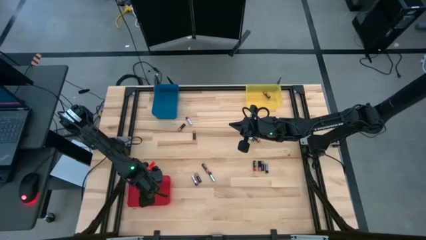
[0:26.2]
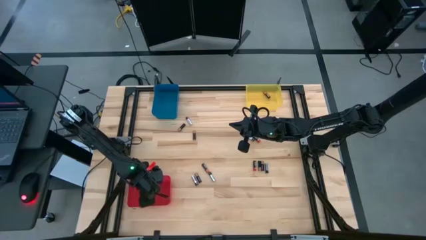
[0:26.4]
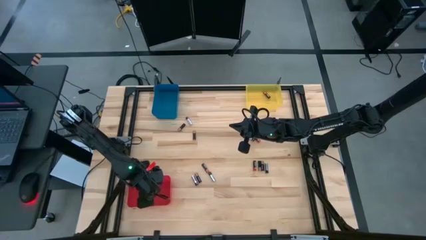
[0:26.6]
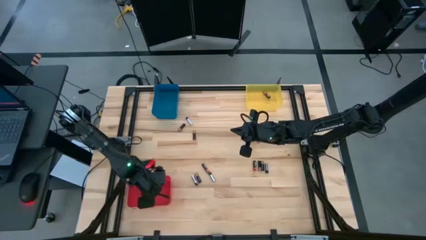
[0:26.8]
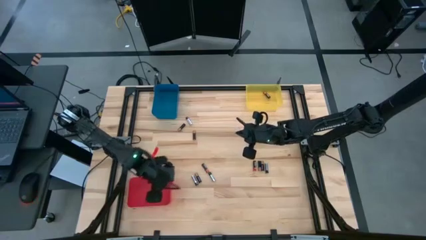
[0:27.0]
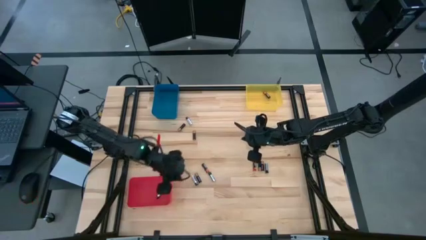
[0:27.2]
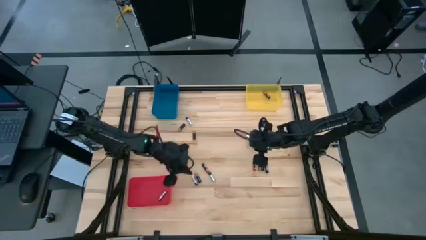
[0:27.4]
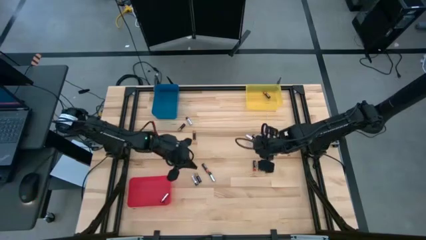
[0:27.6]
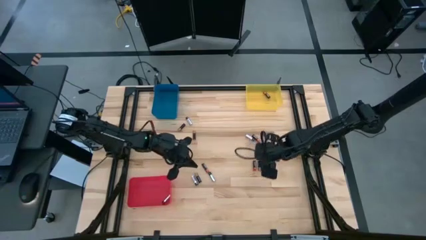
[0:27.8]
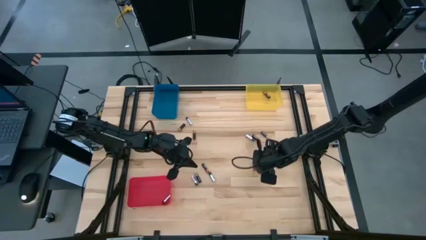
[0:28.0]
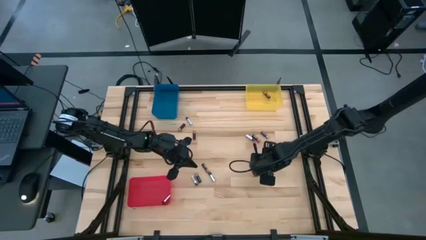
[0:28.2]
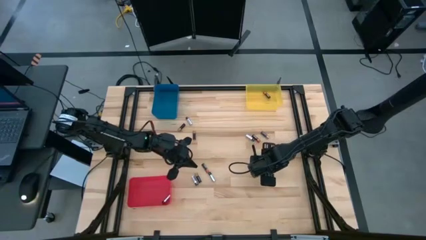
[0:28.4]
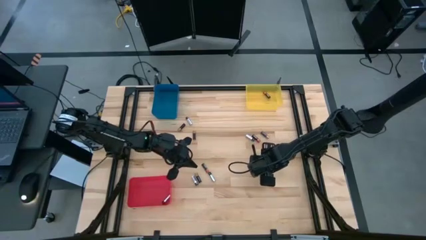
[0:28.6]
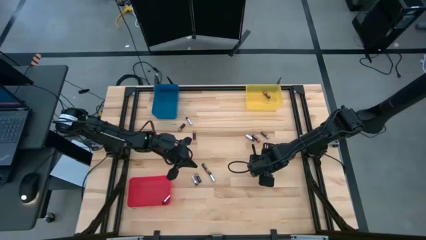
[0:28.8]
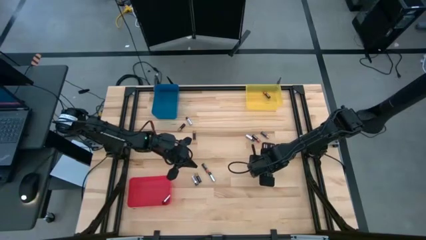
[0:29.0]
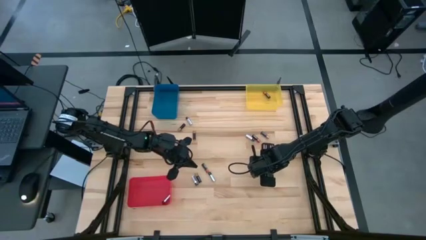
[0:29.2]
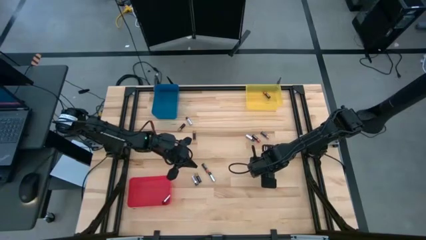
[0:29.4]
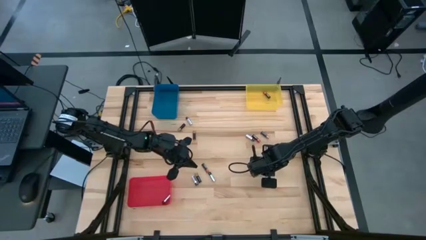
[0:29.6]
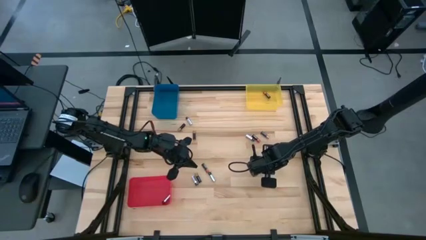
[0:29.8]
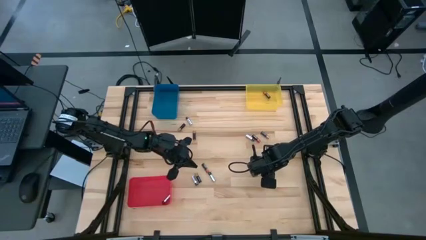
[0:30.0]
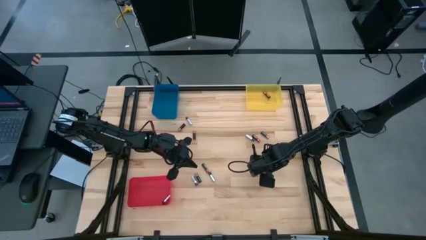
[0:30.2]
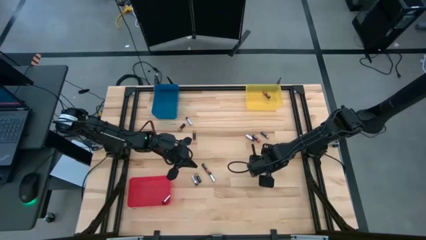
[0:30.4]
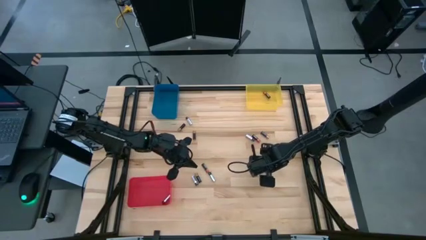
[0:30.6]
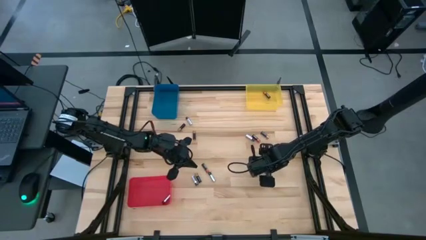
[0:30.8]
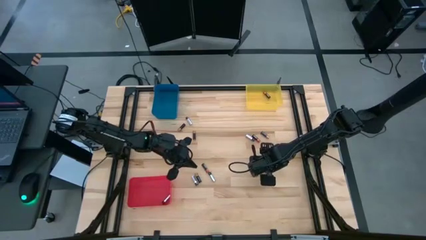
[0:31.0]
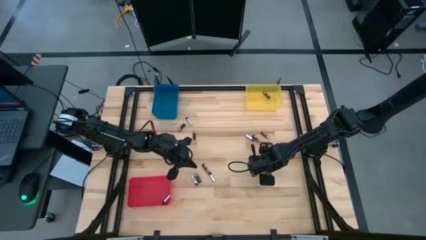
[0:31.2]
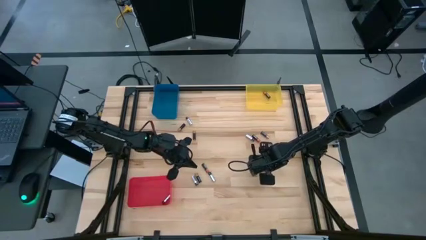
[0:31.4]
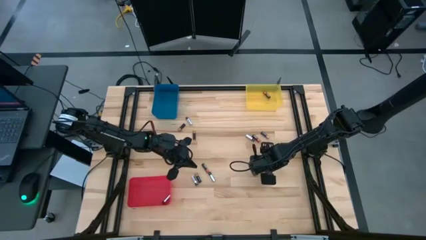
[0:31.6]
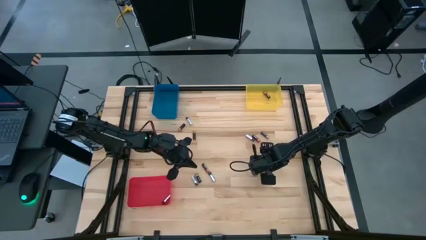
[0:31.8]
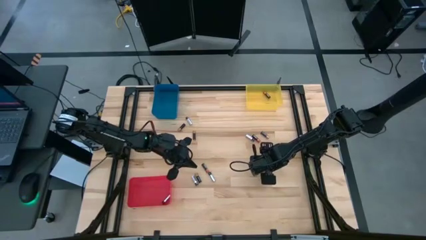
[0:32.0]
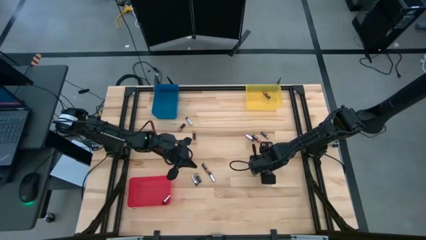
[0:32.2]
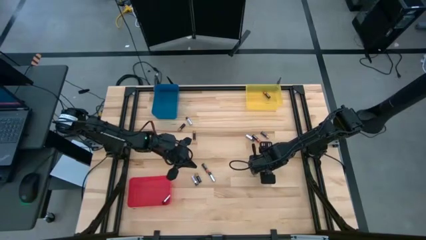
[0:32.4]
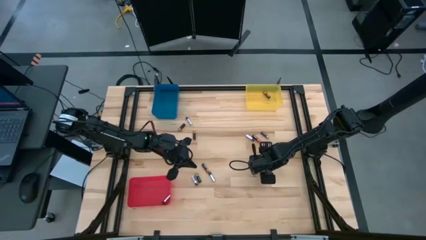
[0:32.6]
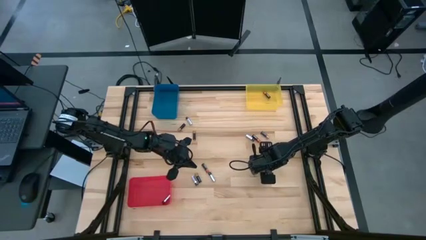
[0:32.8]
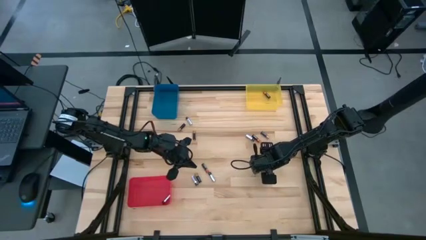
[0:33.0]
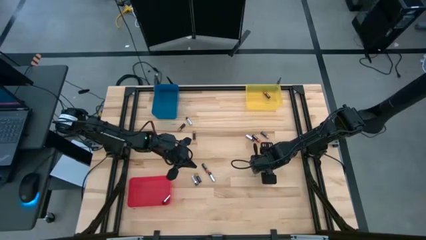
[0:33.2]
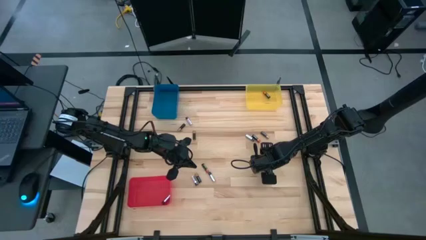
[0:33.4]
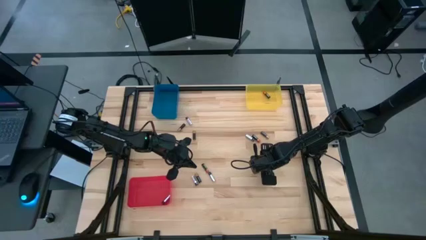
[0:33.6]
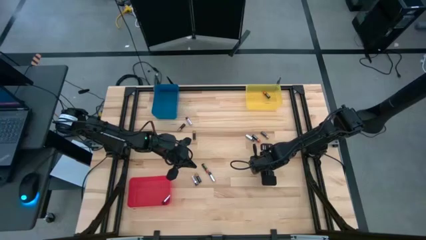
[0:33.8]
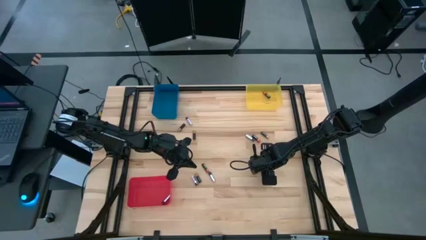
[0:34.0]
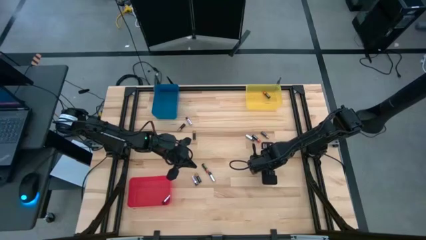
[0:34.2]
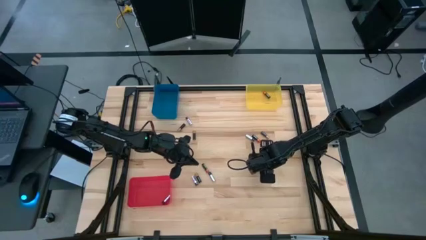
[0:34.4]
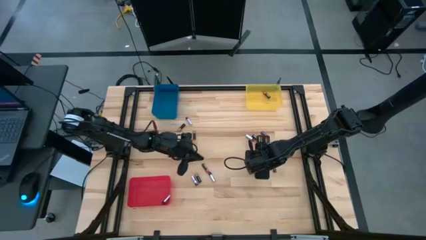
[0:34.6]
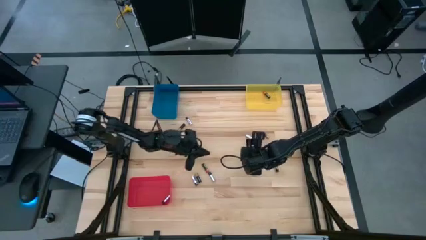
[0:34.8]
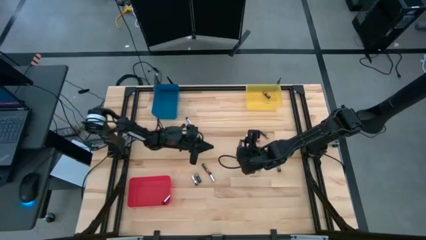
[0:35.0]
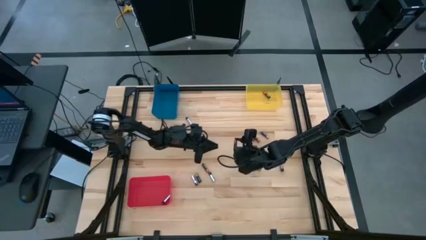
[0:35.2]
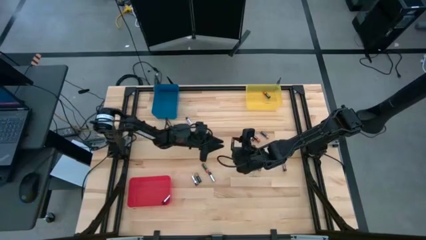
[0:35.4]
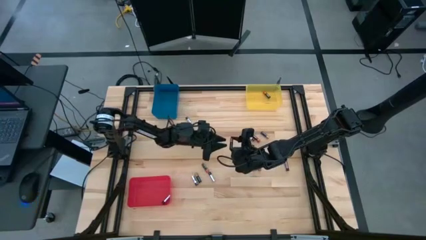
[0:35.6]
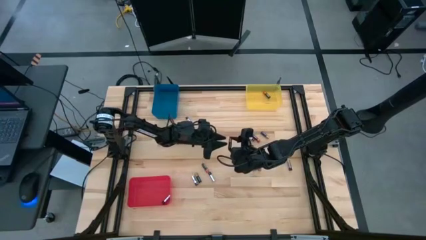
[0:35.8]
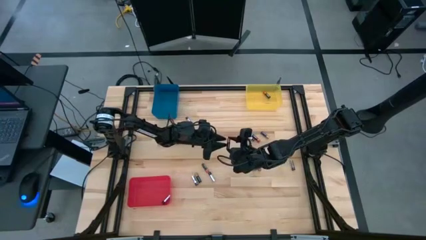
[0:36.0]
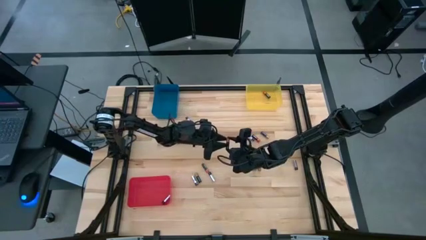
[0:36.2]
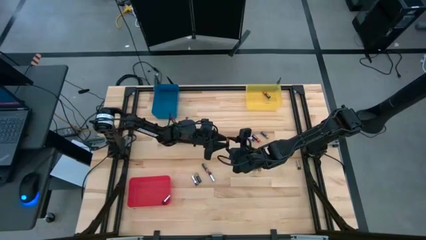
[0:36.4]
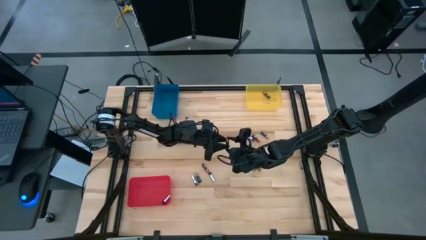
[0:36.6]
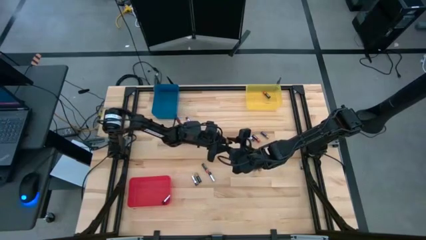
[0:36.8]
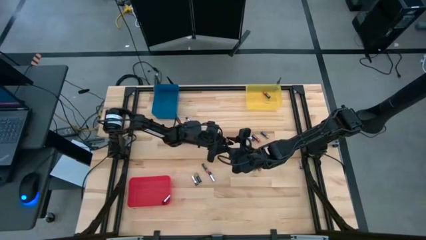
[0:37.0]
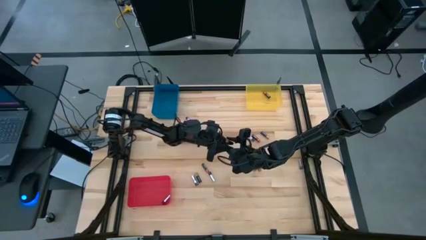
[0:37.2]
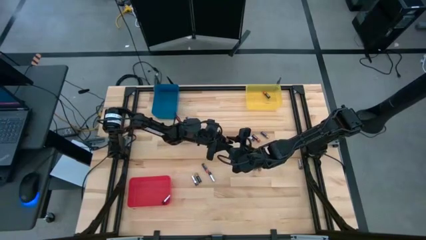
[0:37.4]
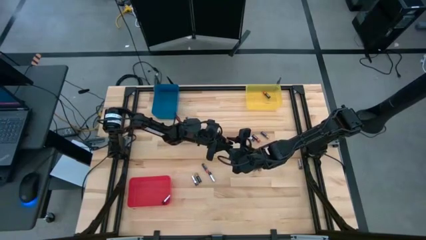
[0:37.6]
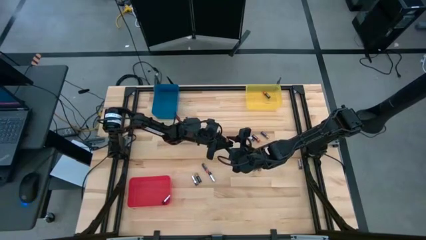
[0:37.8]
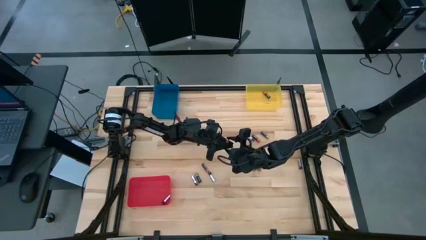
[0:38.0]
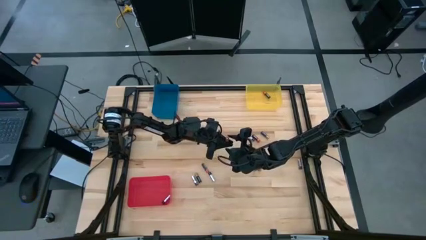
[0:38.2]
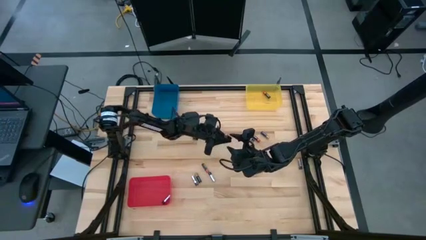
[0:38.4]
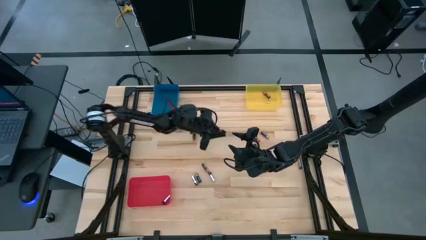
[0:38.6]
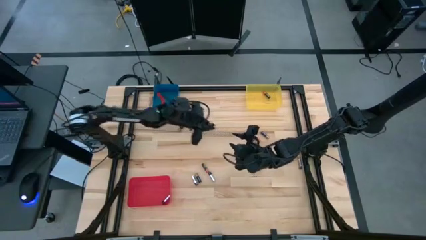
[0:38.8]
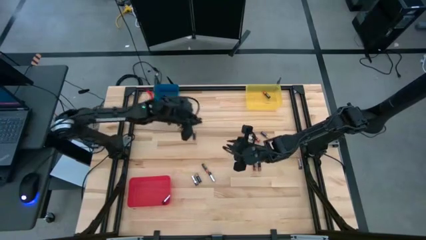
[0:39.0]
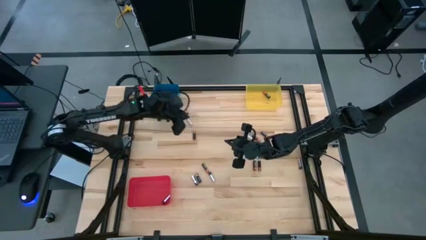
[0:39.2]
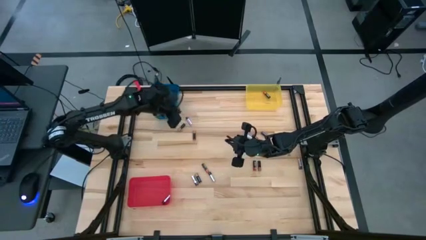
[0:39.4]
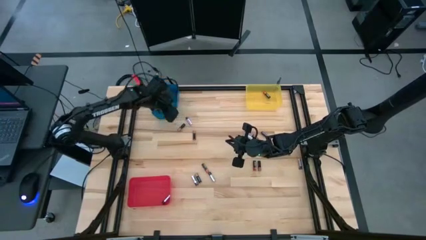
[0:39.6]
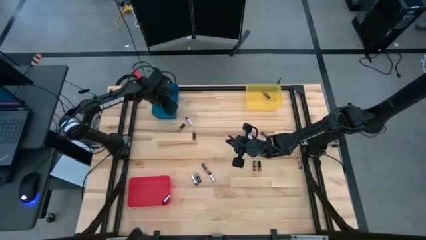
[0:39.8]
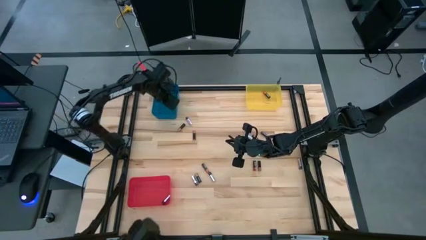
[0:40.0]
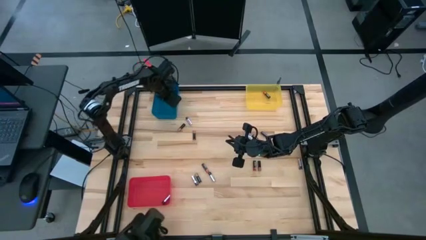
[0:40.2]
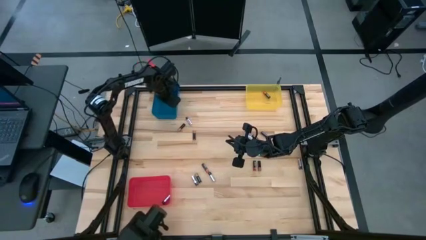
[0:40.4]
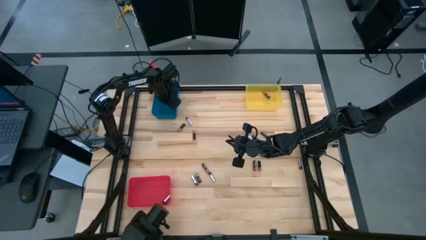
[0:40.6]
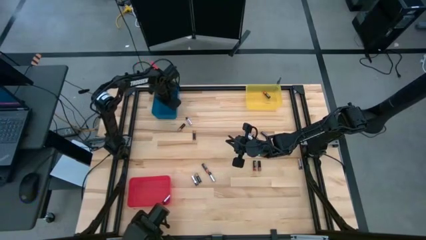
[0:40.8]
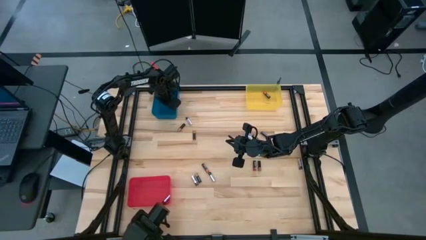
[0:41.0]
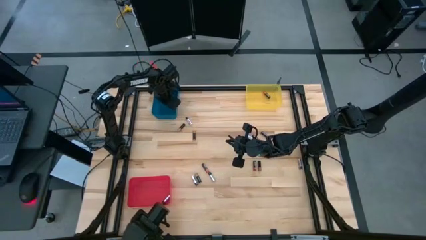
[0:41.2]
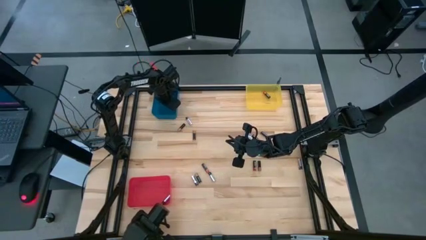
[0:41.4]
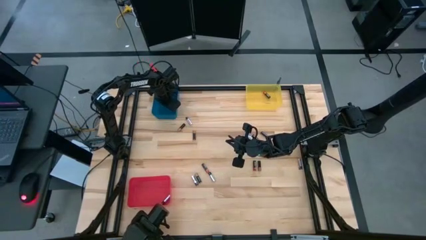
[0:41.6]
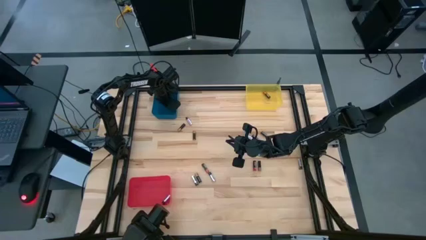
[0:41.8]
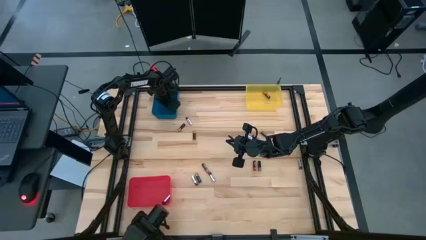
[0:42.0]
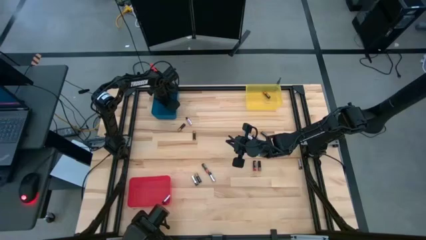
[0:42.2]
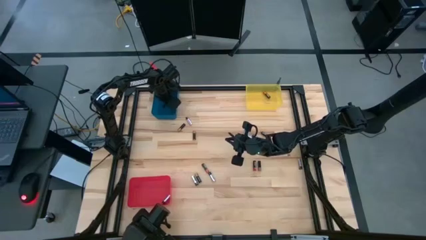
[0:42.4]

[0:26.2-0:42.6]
Task: Sort batteries
Put the black battery into the blue bin
